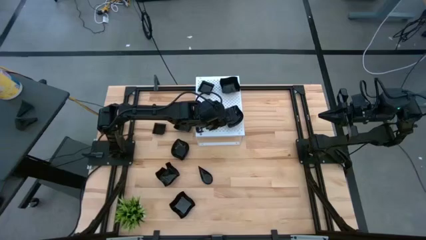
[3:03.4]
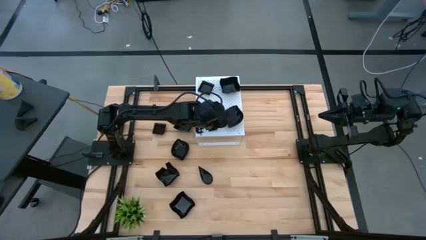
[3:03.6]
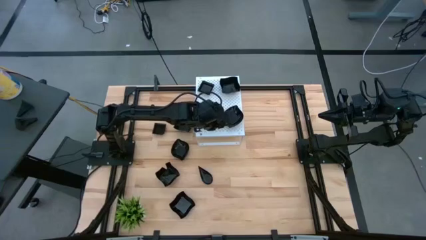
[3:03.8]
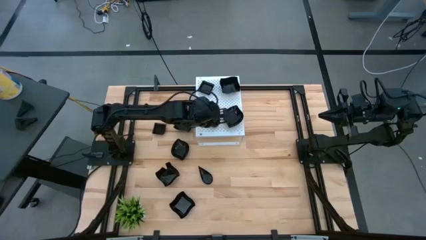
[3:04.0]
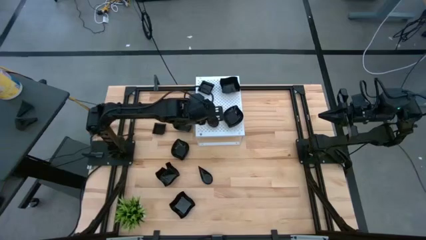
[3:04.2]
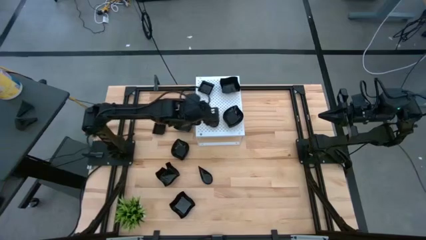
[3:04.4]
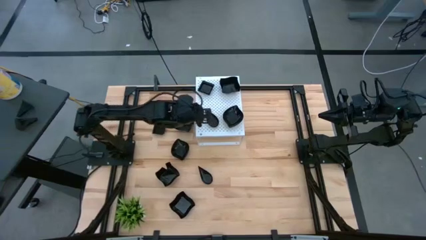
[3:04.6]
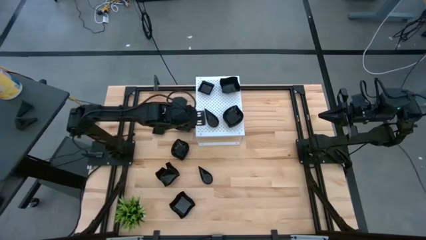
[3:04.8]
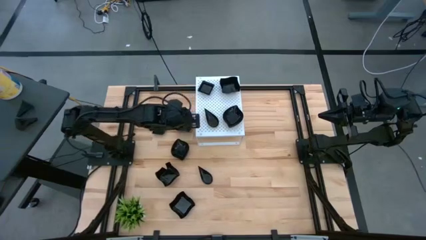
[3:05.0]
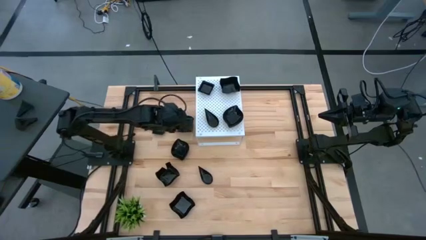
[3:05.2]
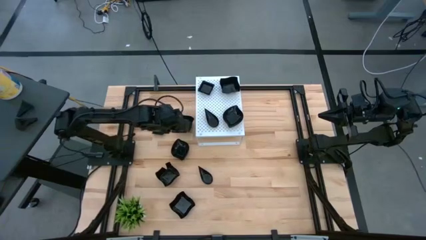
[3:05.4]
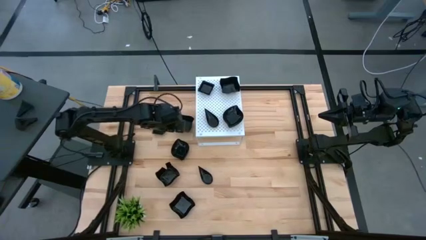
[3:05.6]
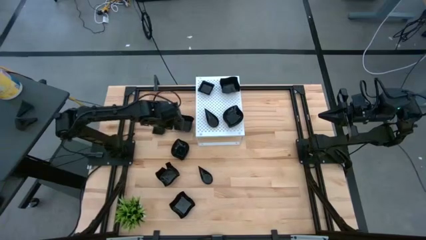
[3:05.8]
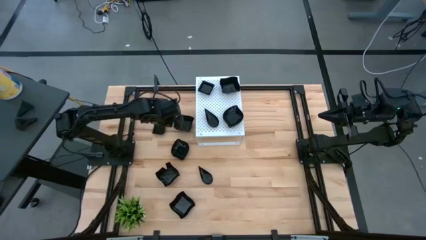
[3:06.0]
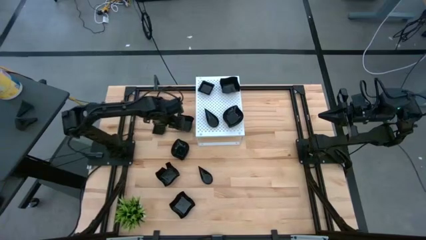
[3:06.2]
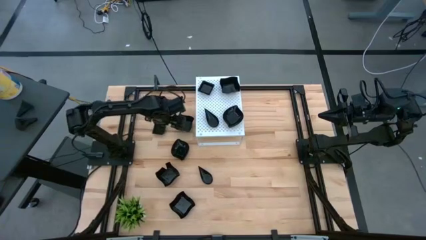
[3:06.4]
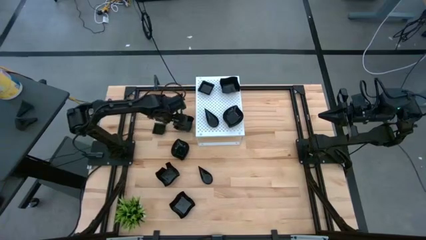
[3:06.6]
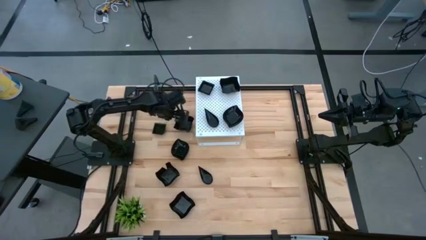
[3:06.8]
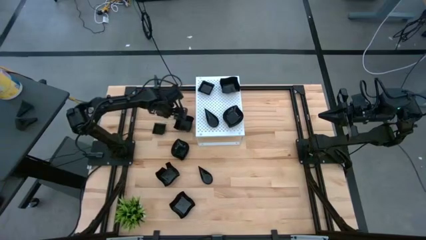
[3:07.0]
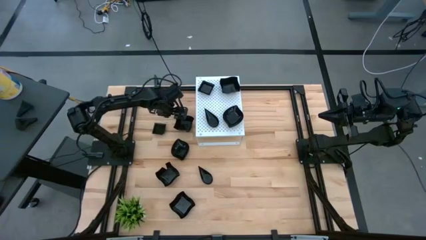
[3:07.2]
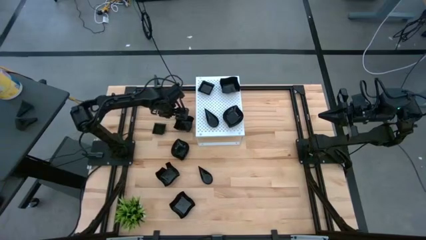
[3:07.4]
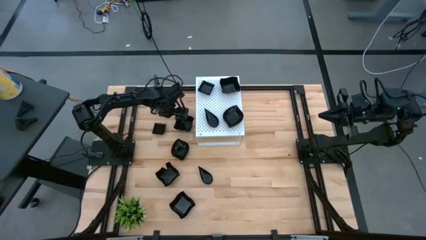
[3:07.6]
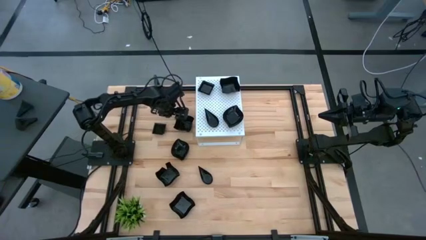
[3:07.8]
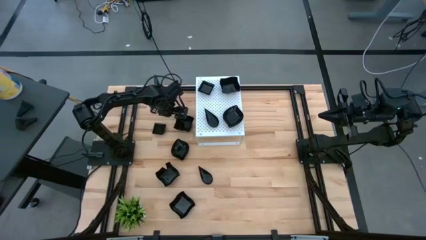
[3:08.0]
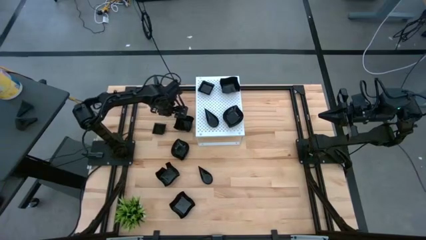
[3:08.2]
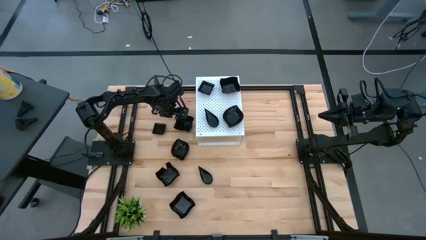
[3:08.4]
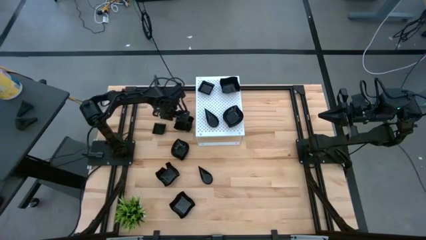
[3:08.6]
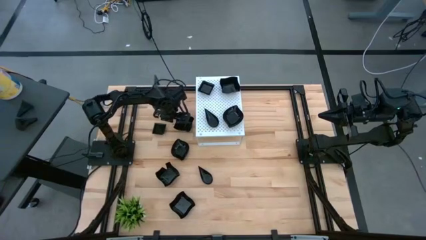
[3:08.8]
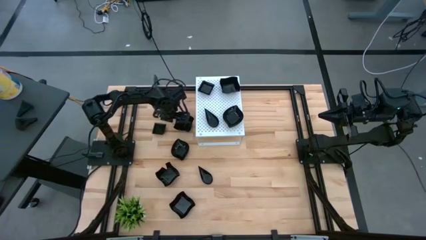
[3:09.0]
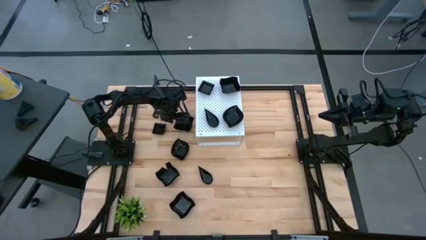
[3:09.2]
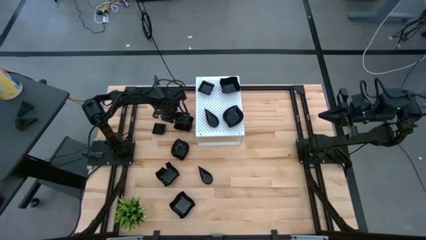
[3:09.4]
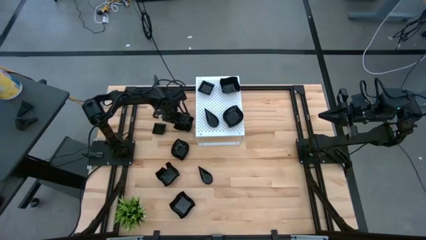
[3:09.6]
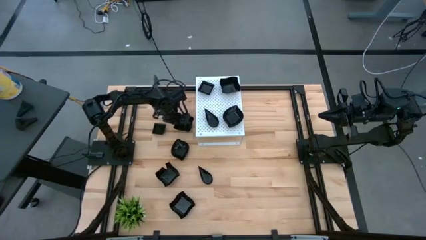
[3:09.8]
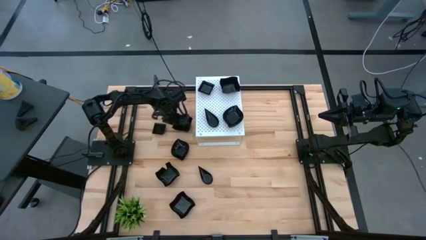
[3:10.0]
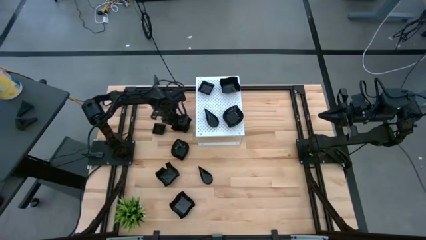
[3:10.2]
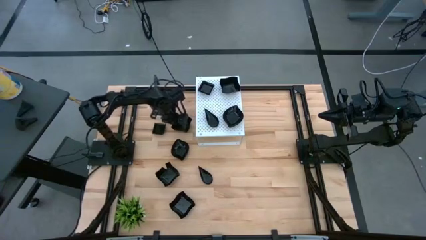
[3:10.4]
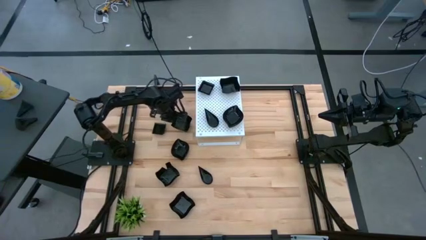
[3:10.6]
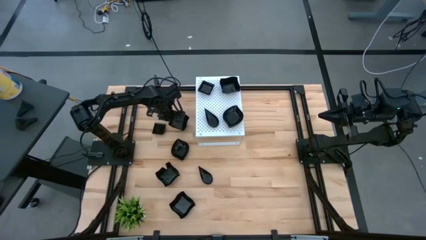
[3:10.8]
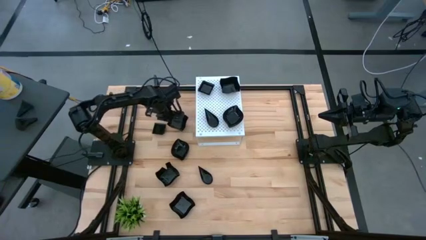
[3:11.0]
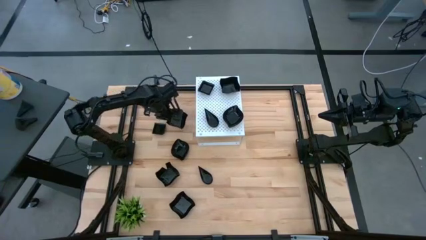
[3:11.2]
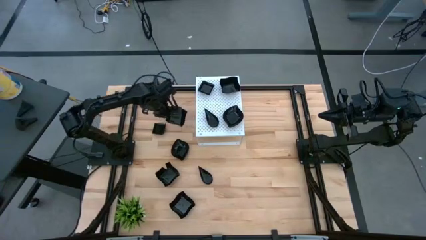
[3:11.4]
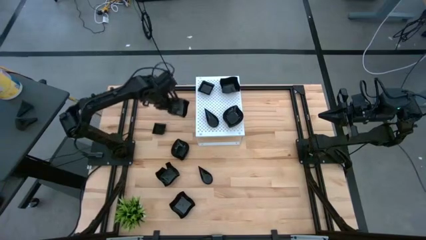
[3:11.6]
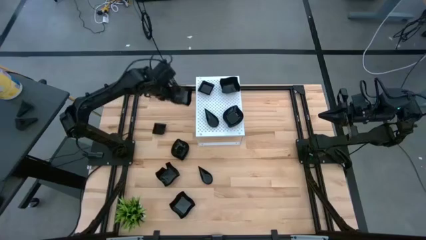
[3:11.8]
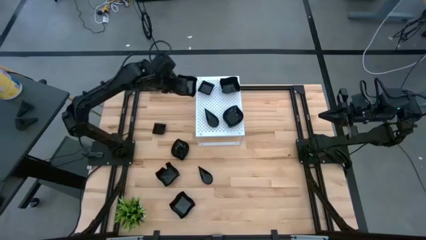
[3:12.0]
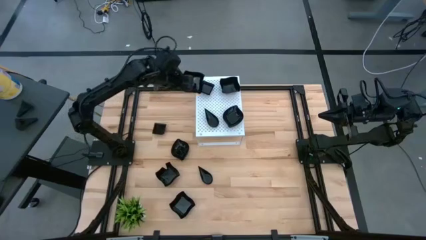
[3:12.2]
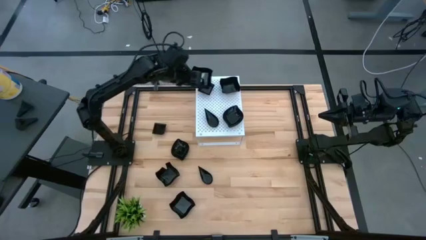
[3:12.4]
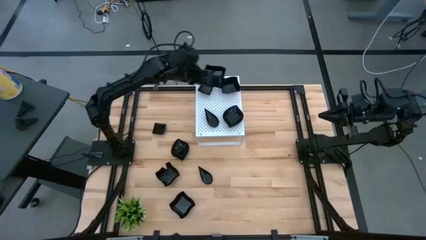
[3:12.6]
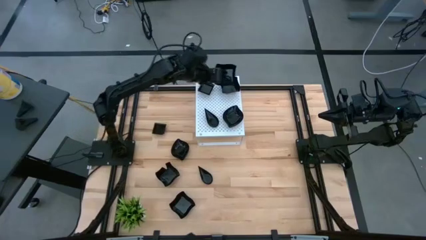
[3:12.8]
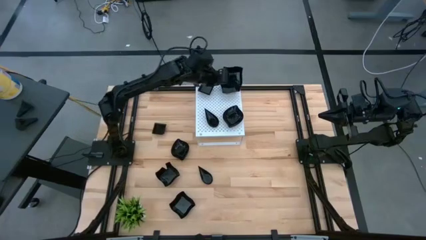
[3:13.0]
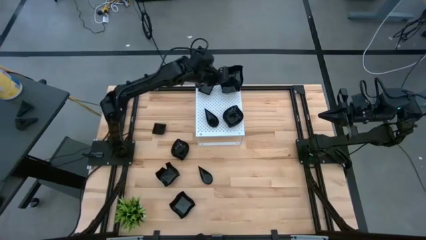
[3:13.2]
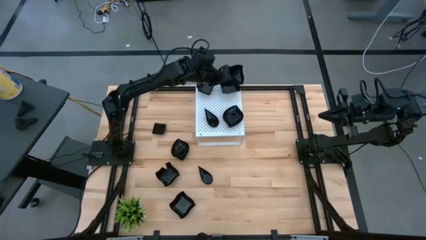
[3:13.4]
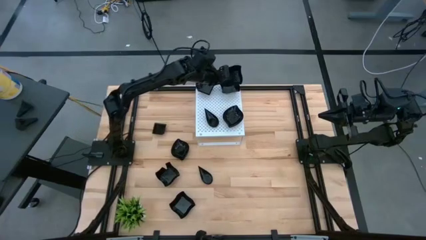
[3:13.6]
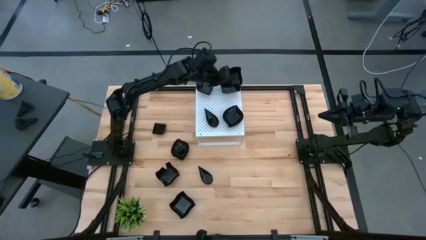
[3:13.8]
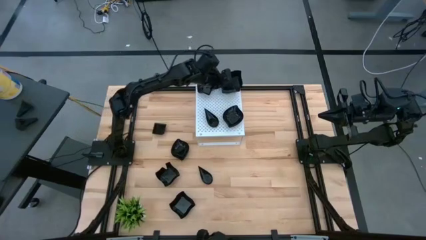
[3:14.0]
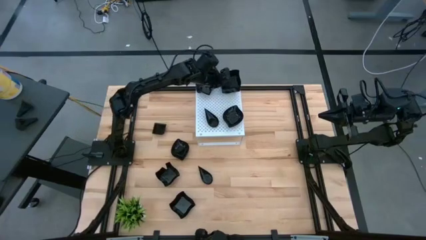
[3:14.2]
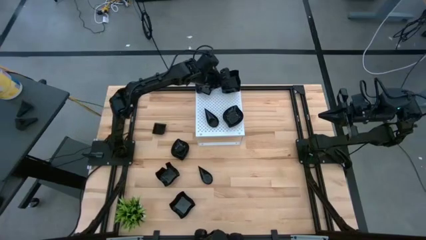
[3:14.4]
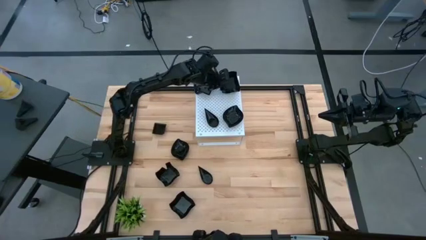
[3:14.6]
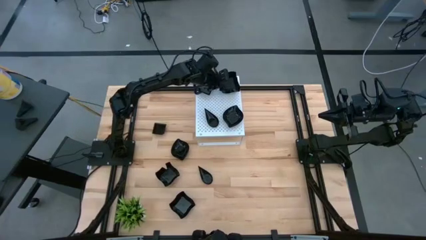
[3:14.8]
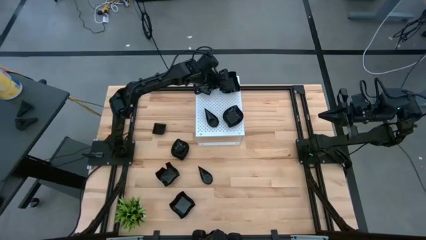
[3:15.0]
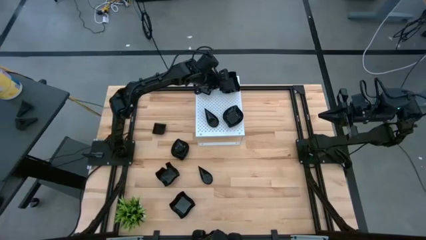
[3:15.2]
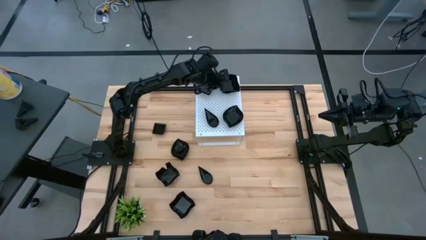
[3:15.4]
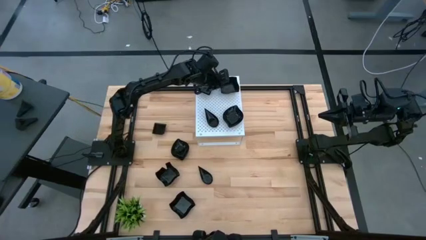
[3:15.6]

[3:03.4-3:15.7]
Task: Pick & Place Mini shaped plates
Stack the distorted square plate on top of the distorted square plate on the shelf

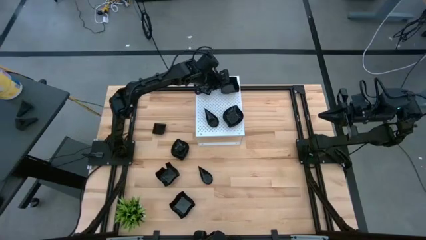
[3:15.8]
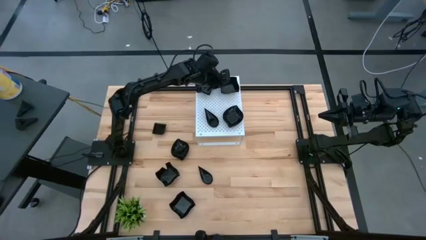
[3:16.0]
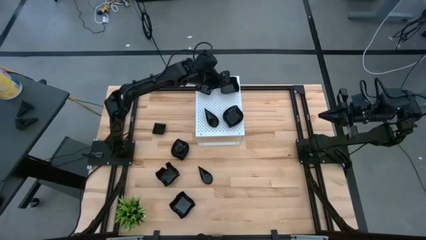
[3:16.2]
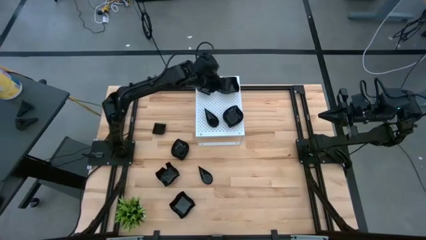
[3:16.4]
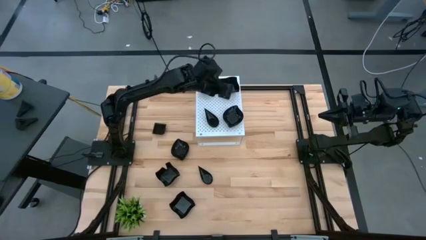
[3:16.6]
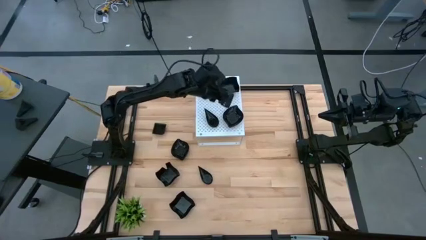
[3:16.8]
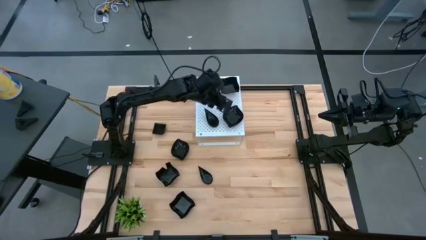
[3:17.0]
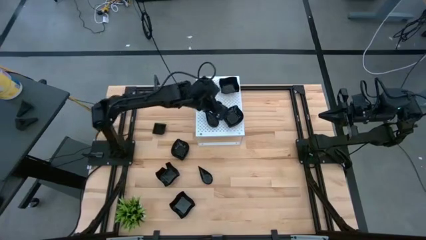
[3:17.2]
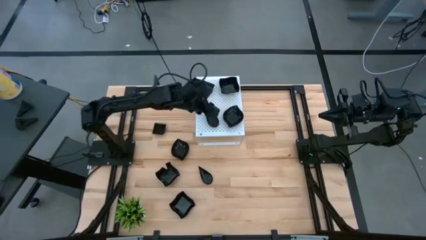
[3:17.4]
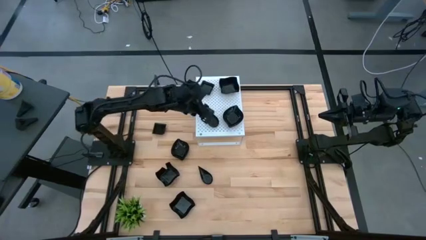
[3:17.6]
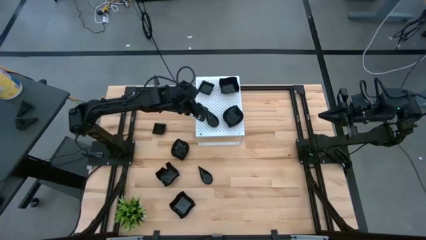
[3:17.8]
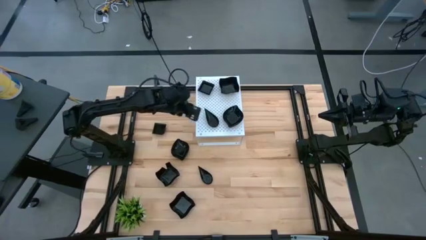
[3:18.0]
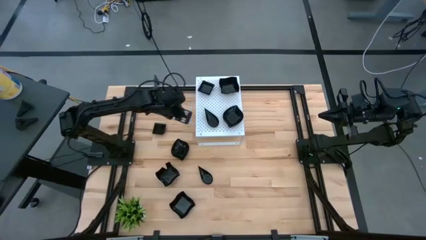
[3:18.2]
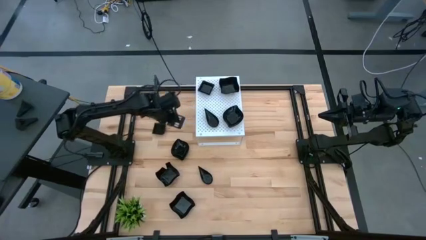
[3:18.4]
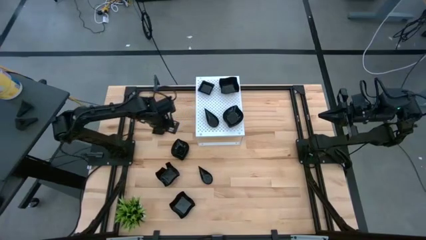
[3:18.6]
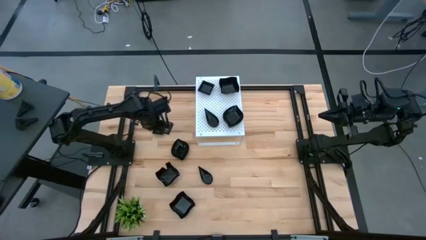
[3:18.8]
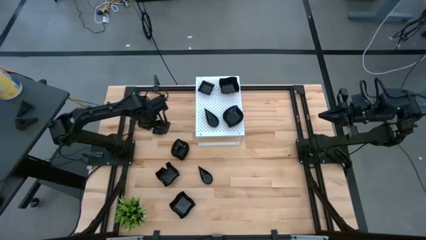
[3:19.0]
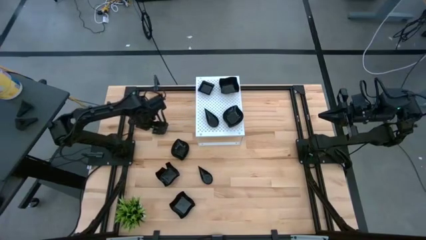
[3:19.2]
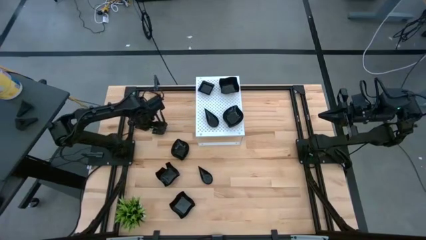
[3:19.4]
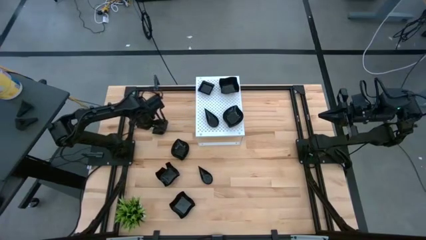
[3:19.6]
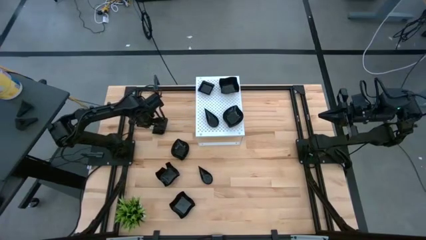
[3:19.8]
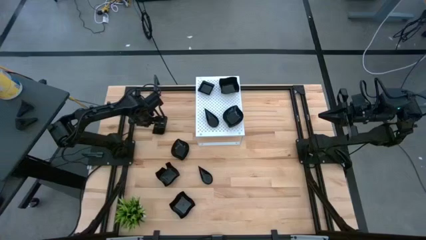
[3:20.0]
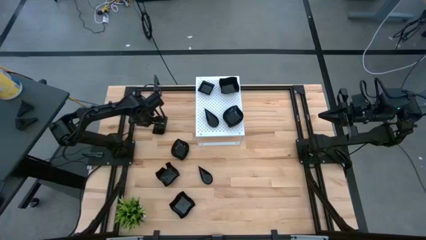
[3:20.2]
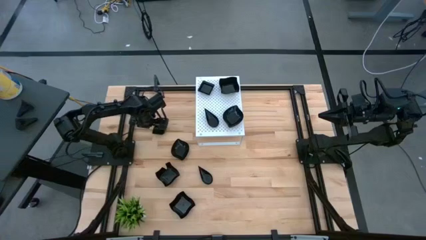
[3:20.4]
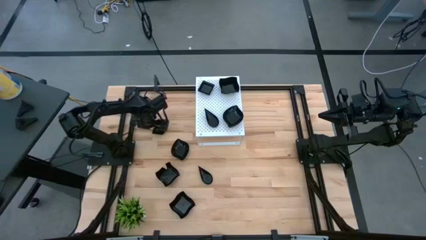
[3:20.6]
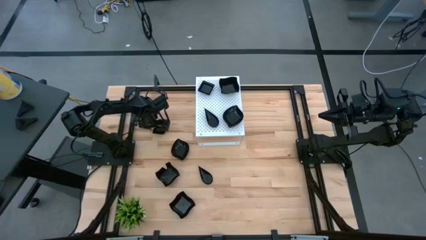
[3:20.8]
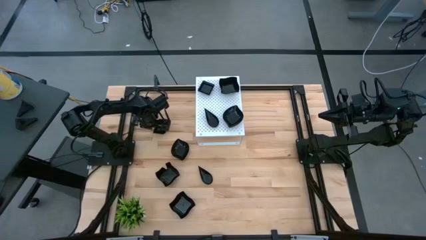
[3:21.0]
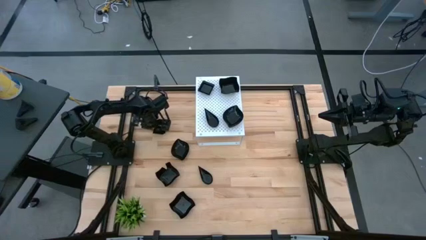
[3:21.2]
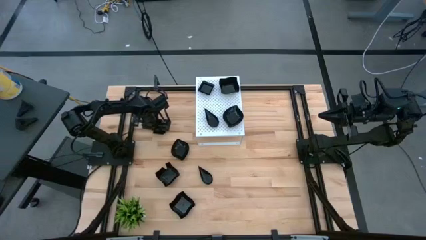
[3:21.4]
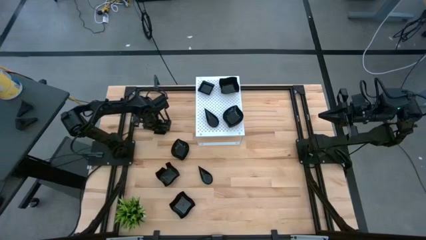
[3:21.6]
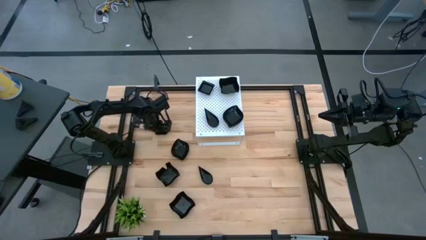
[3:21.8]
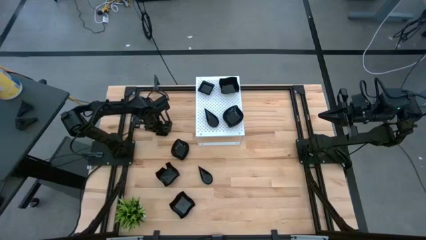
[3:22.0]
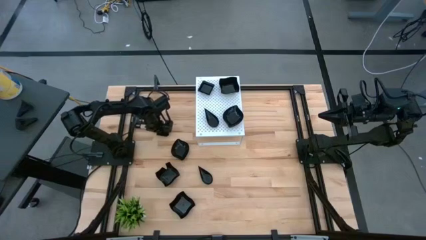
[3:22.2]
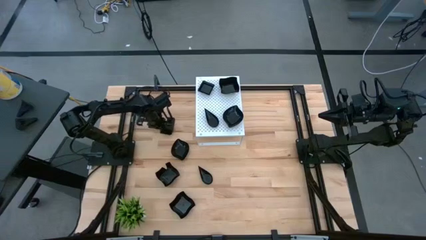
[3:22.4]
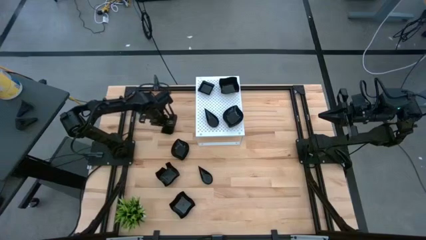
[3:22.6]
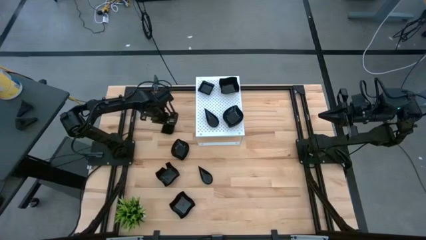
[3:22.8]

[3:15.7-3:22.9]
Stack the square plate on top of the square plate on the shelf
